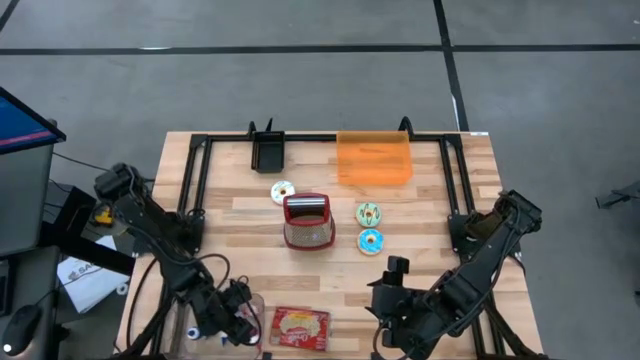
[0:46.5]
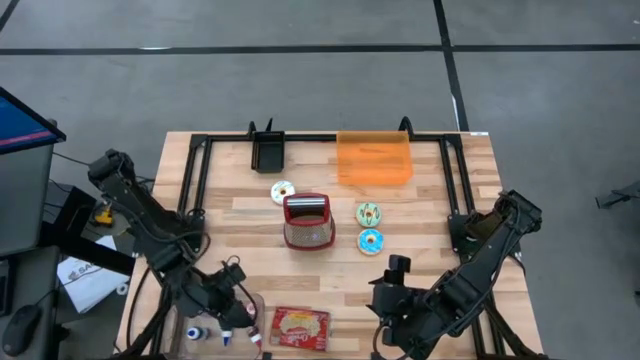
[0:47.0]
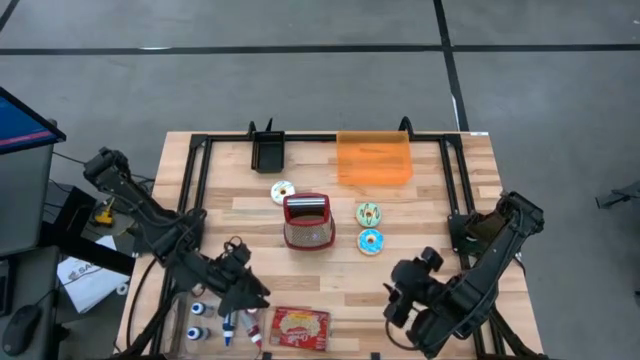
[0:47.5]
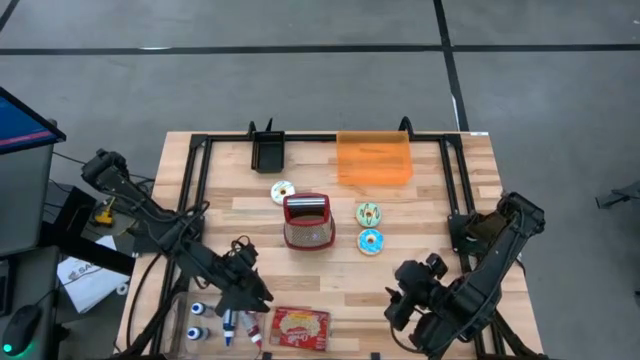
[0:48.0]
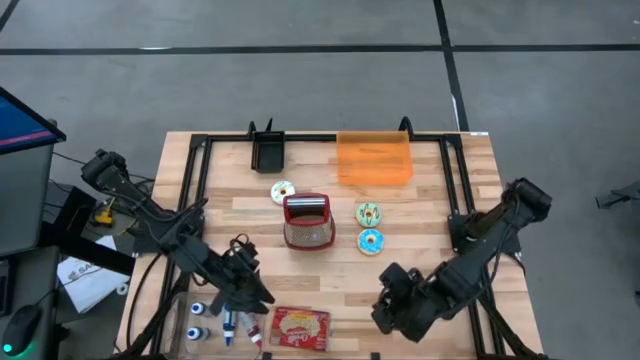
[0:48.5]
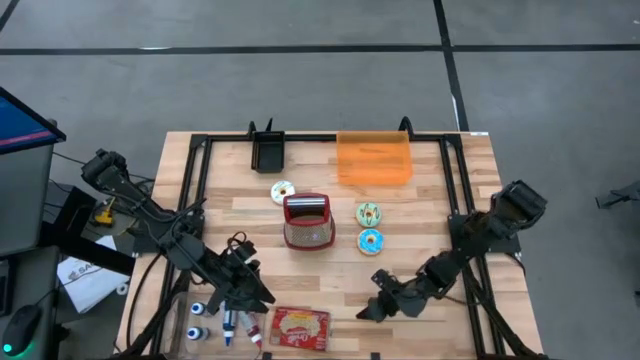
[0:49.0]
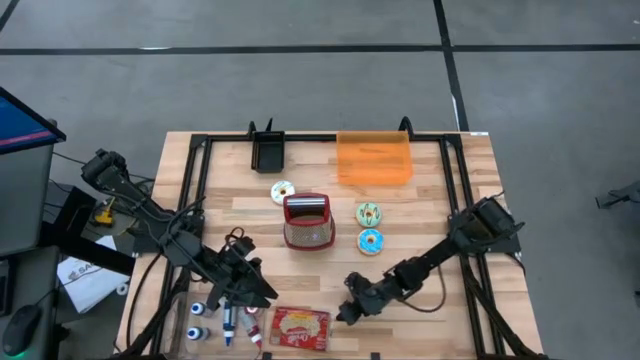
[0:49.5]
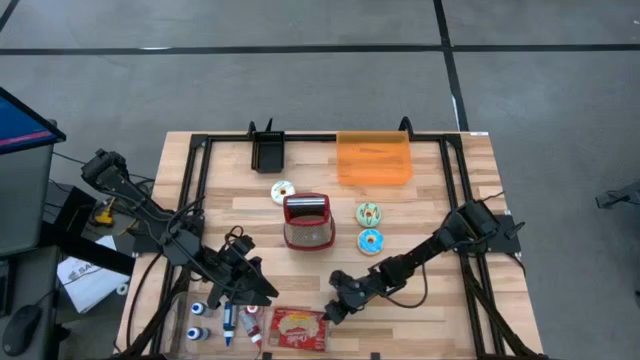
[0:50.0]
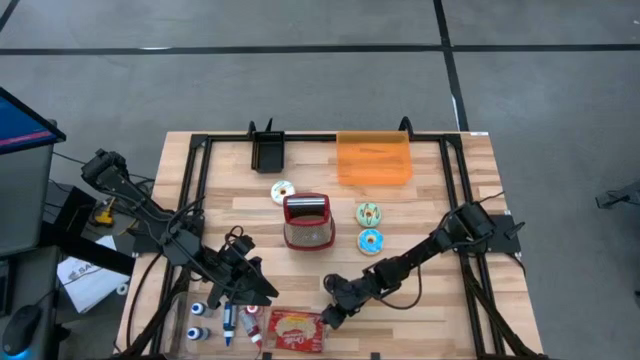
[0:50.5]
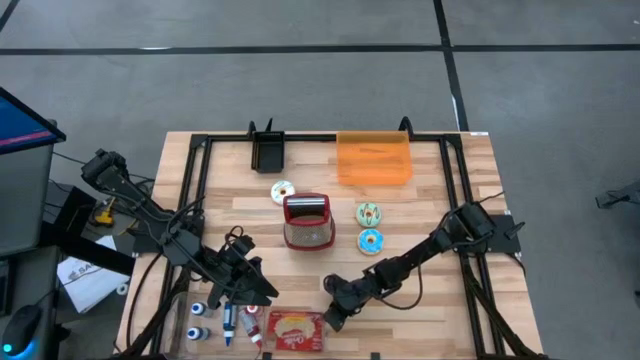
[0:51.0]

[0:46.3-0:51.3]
Put the red popcorn bag into the orange bin

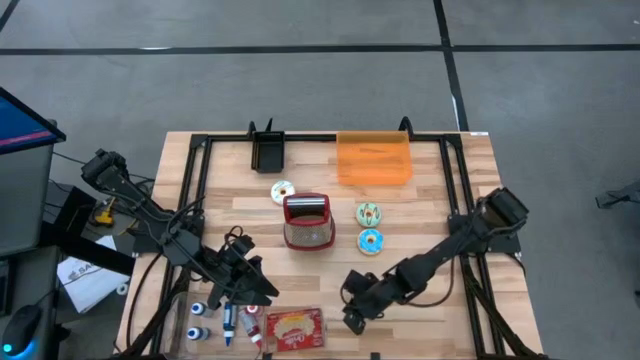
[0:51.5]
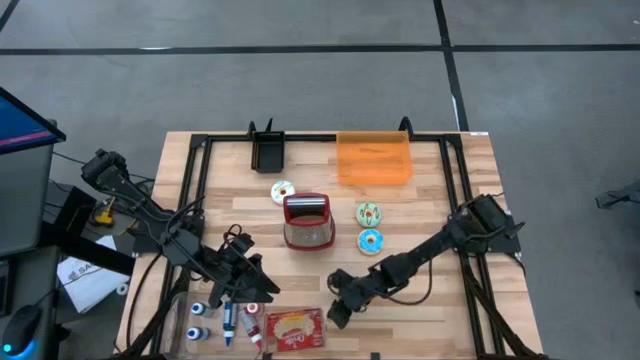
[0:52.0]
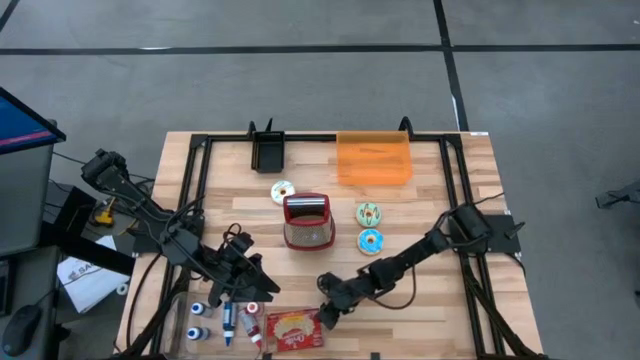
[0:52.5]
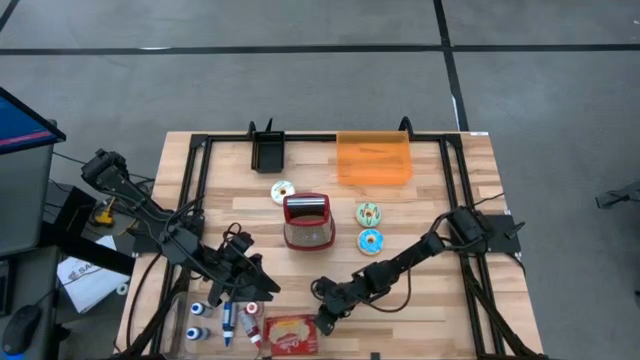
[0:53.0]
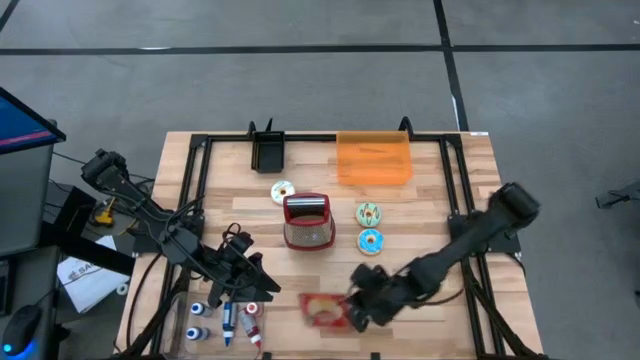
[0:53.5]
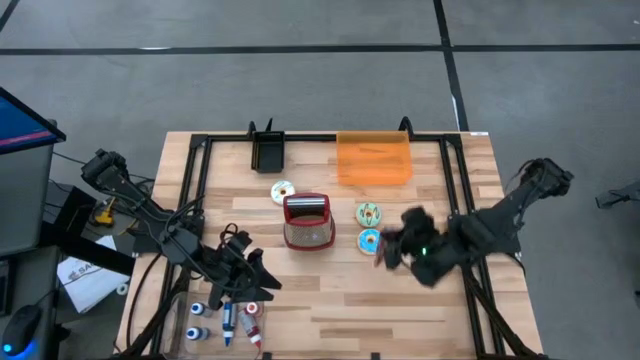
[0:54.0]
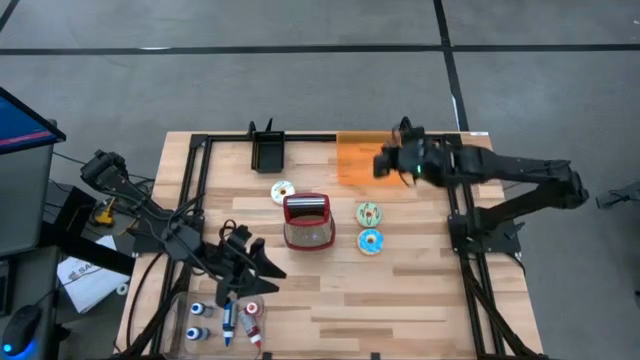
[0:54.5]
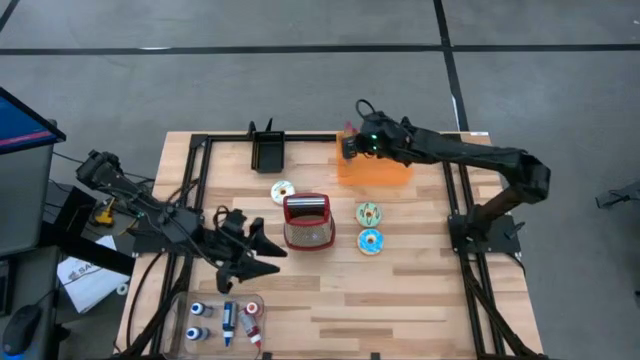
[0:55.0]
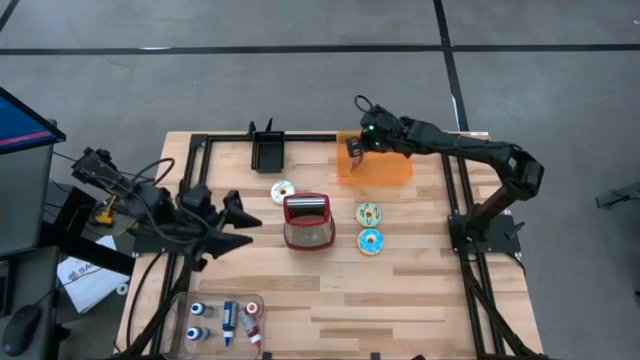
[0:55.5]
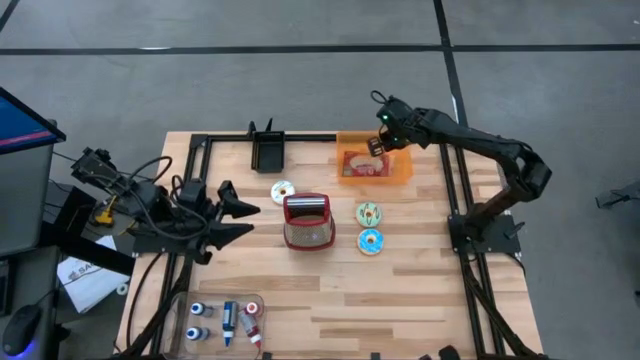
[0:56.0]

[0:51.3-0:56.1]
Put the red popcorn bag into the orange bin

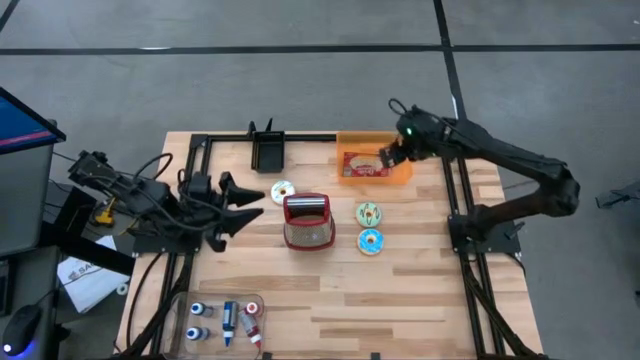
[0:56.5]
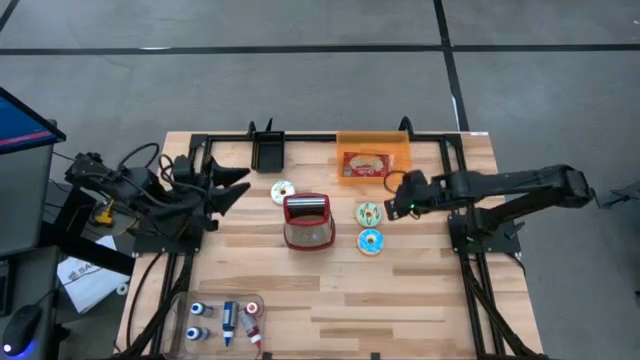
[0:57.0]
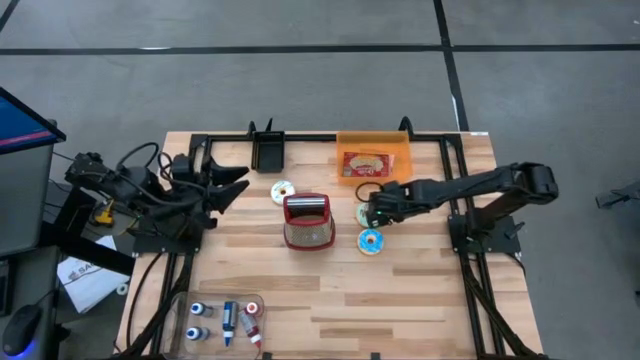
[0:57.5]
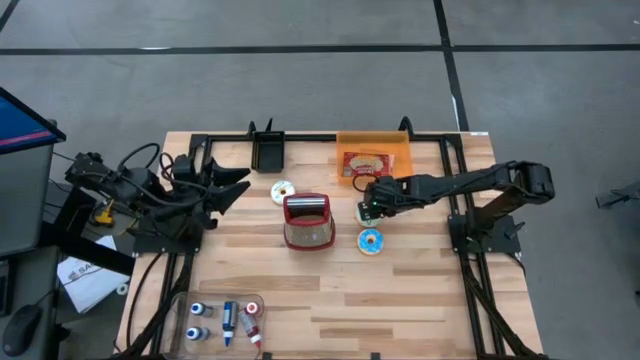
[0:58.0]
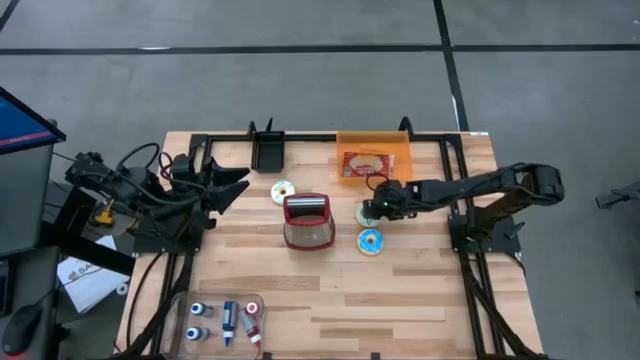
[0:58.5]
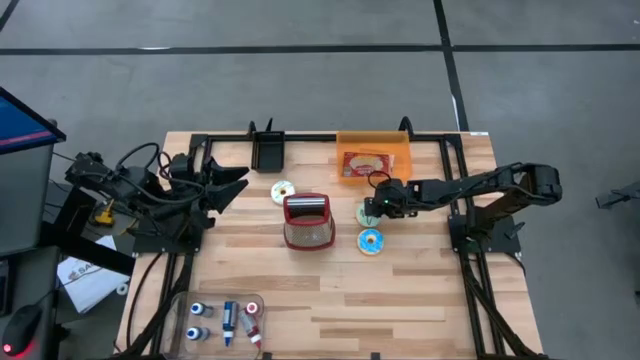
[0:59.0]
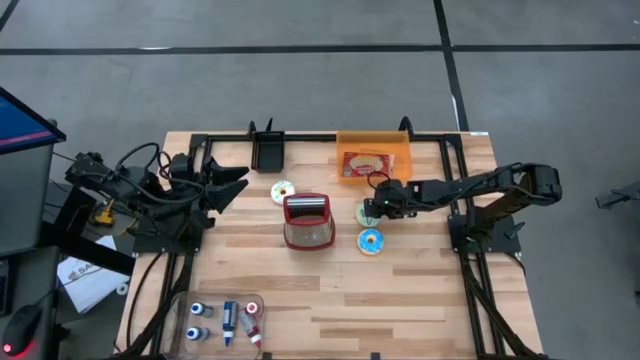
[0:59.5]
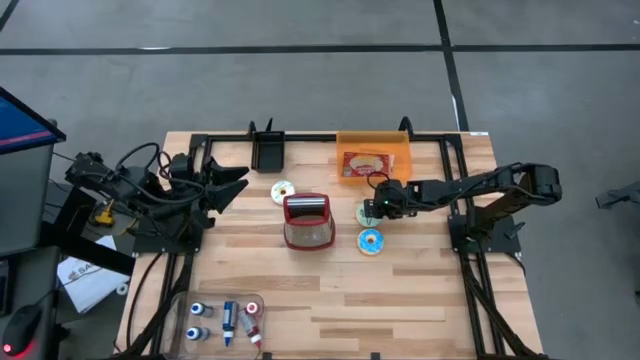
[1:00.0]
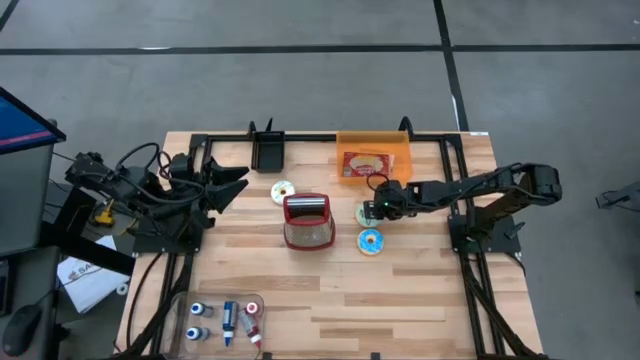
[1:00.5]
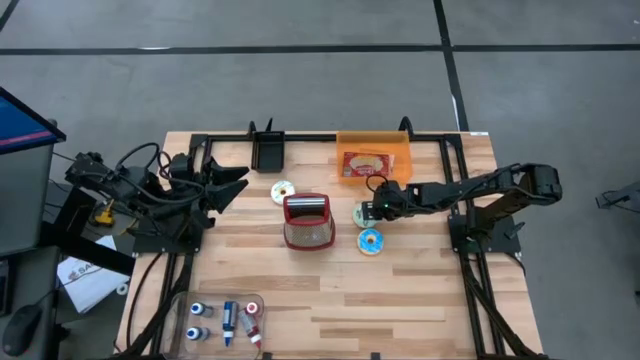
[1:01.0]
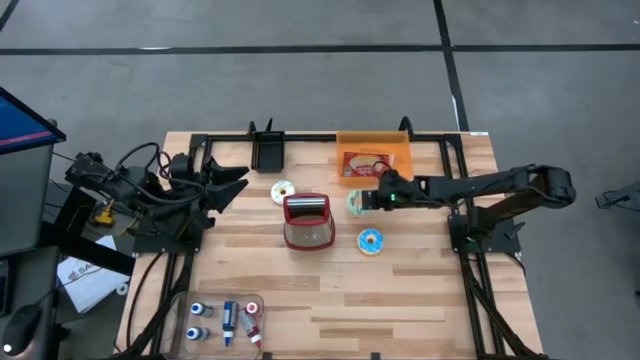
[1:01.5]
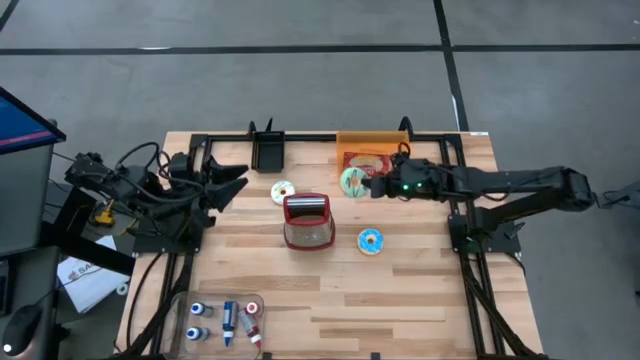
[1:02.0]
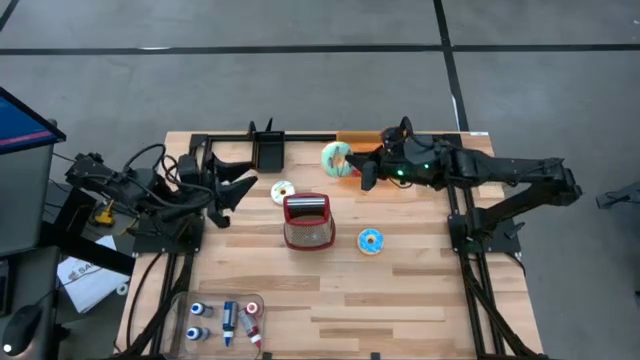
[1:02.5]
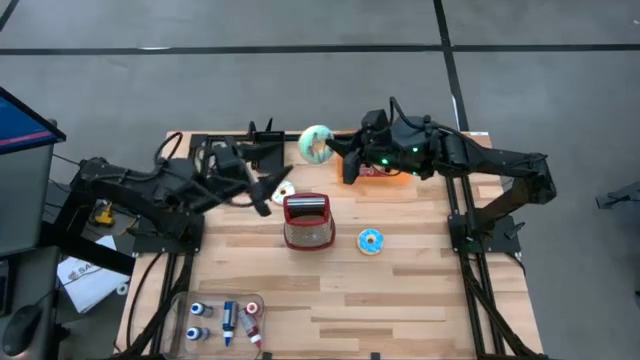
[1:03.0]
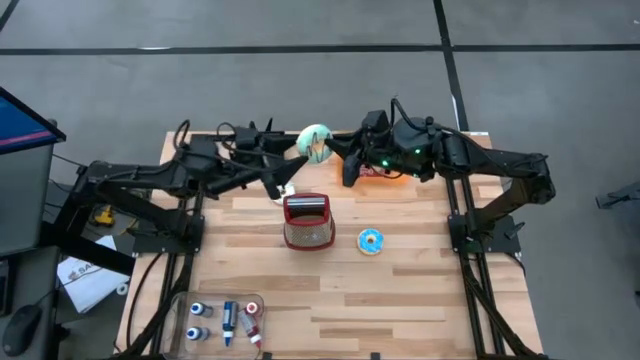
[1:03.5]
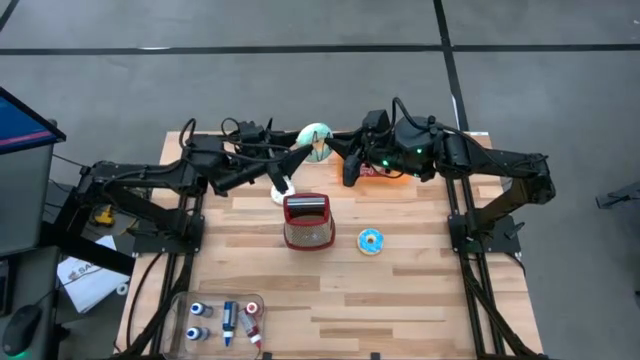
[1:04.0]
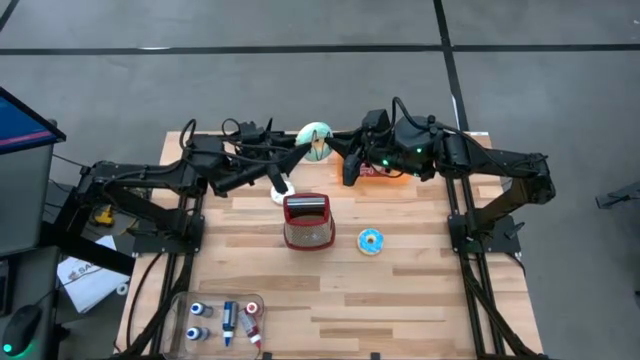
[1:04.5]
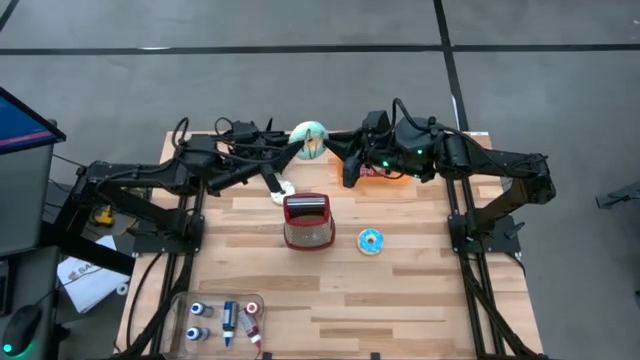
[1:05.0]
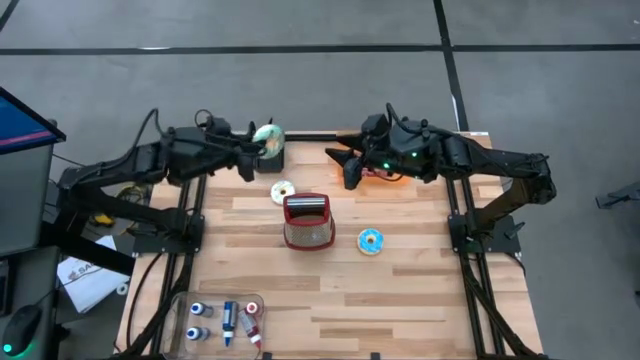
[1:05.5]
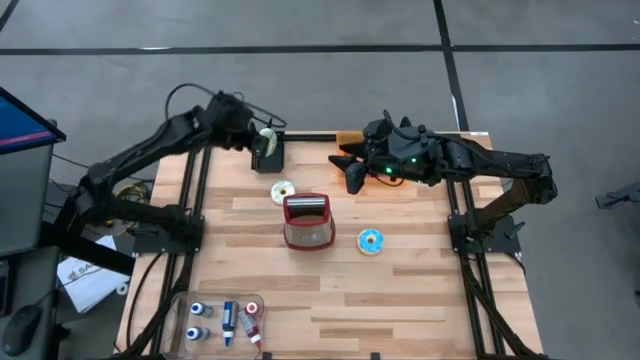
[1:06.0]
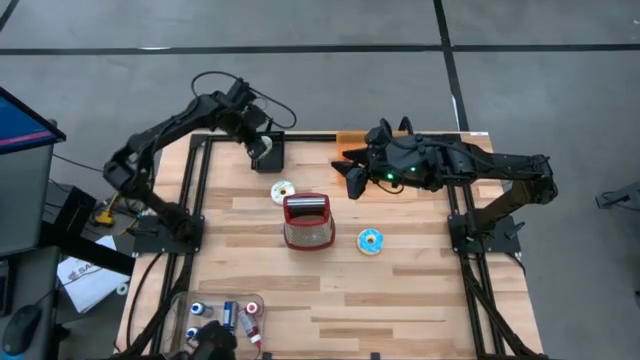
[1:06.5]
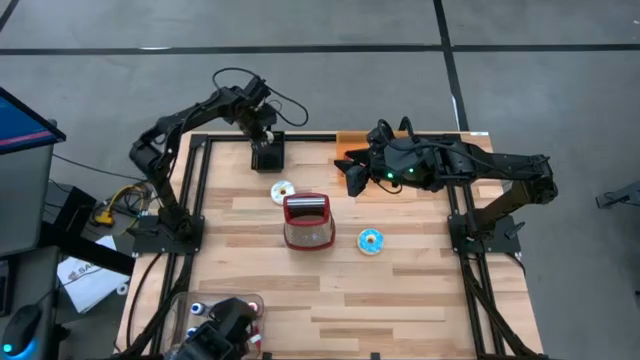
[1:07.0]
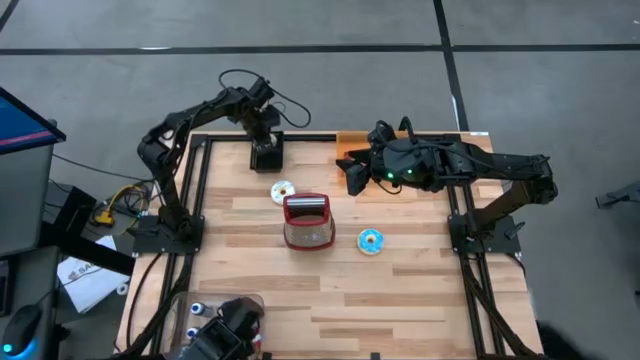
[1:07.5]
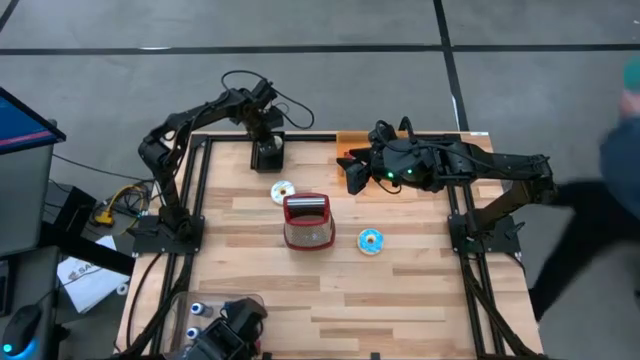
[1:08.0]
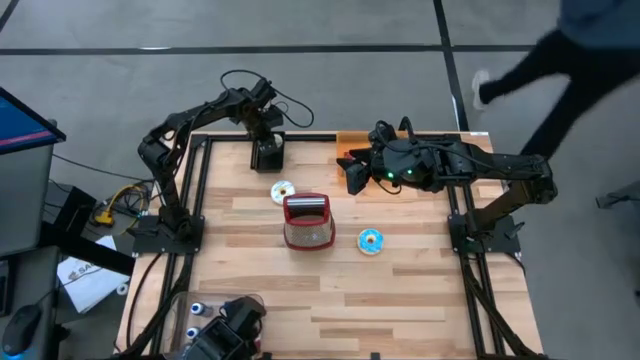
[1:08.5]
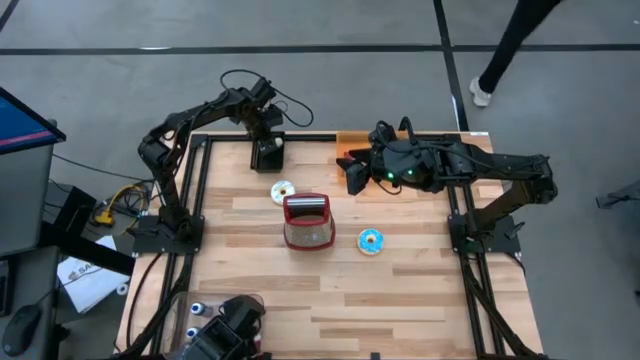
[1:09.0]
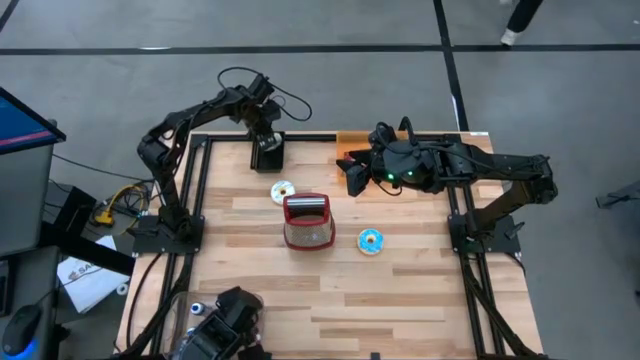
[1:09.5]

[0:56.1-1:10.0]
Put the green donut into the black bin
